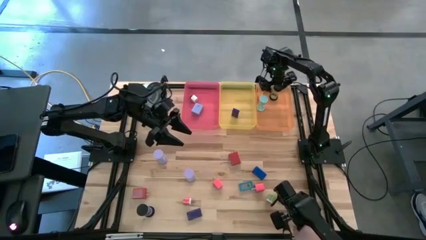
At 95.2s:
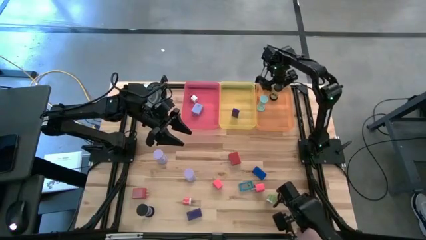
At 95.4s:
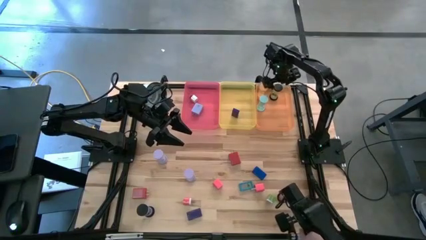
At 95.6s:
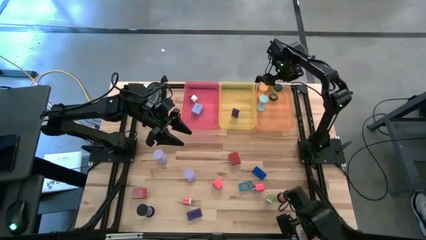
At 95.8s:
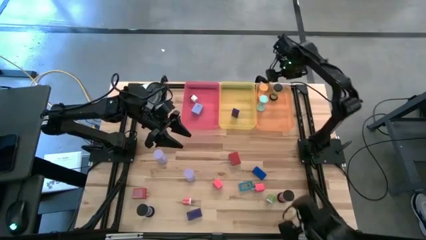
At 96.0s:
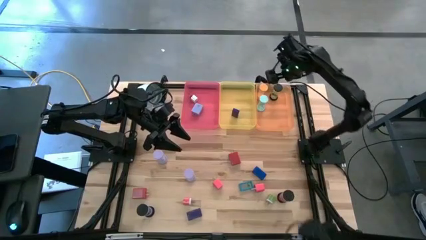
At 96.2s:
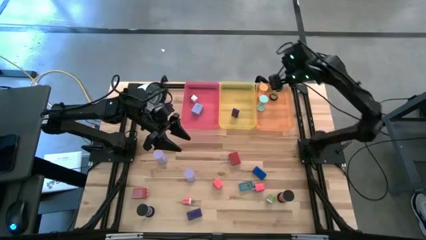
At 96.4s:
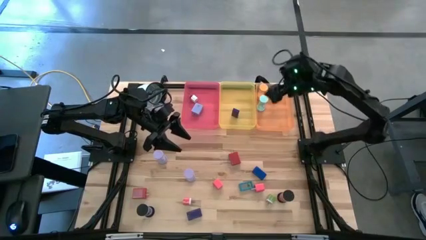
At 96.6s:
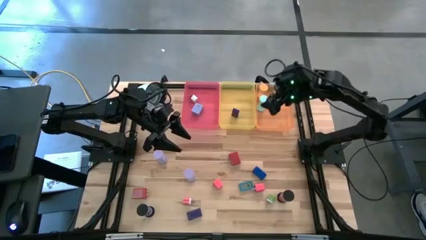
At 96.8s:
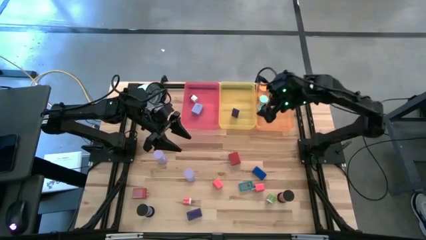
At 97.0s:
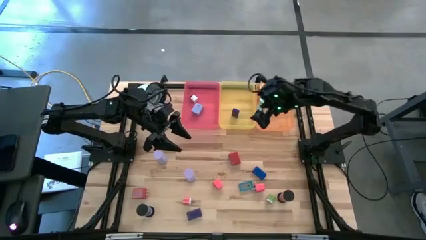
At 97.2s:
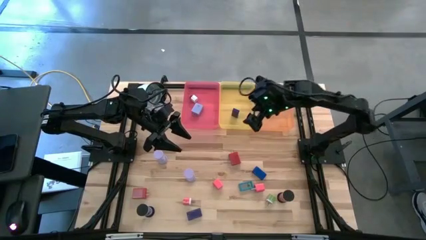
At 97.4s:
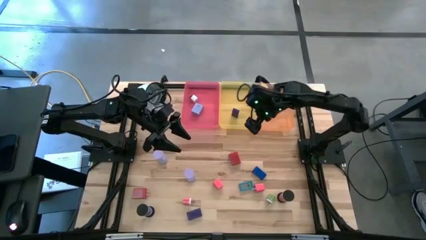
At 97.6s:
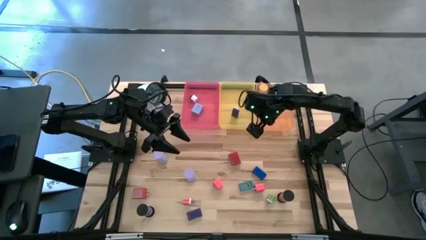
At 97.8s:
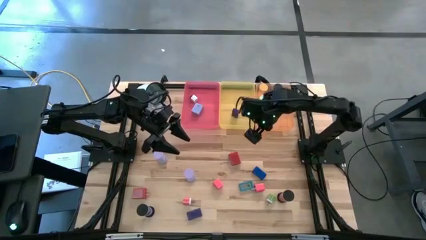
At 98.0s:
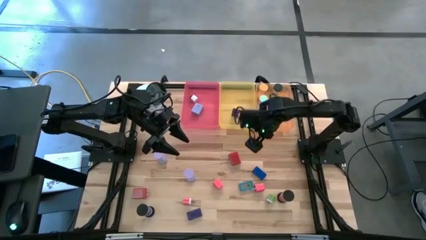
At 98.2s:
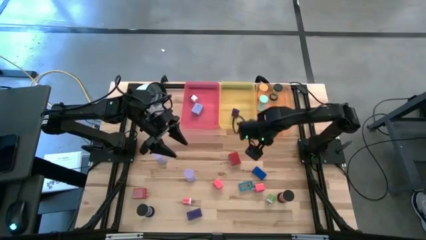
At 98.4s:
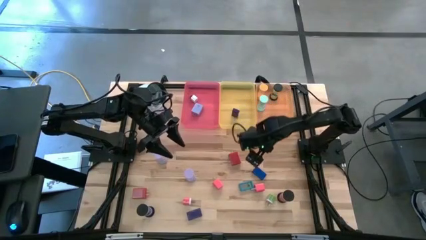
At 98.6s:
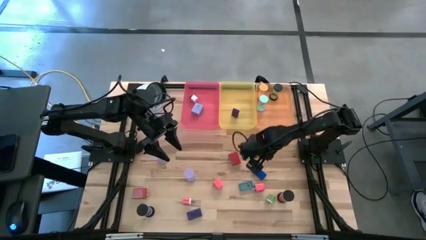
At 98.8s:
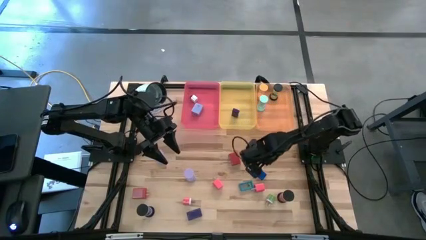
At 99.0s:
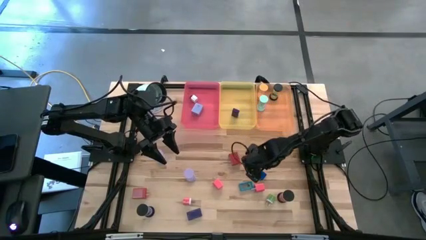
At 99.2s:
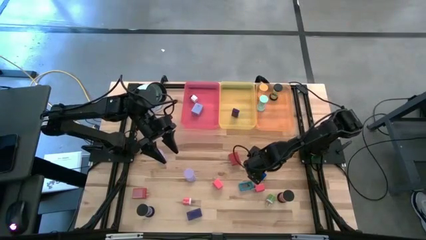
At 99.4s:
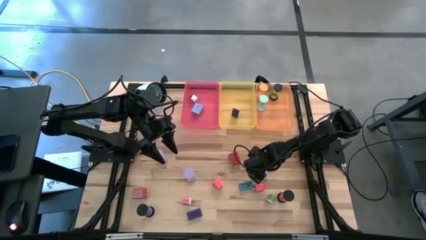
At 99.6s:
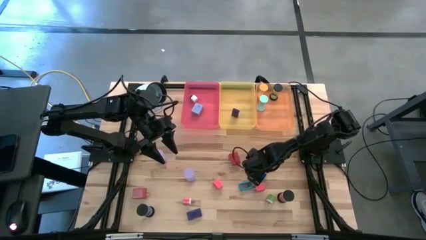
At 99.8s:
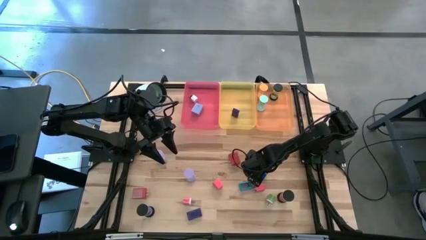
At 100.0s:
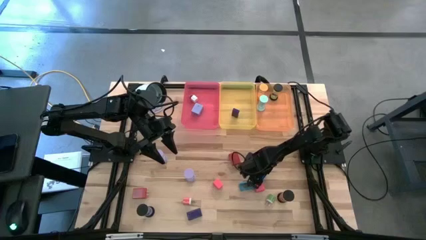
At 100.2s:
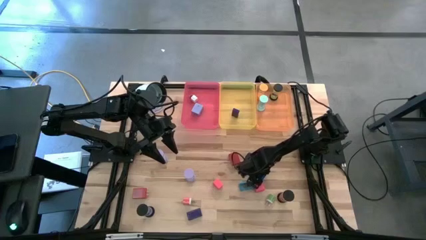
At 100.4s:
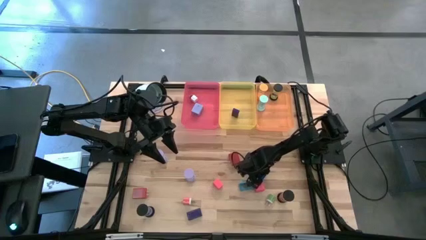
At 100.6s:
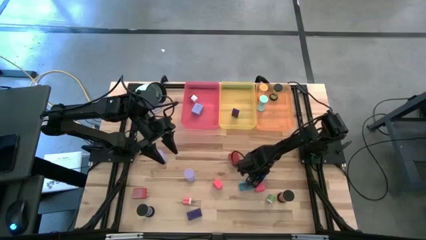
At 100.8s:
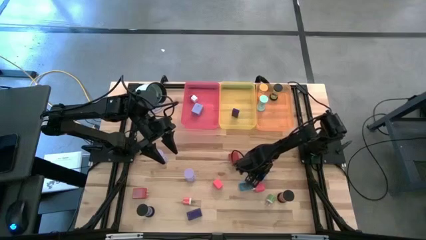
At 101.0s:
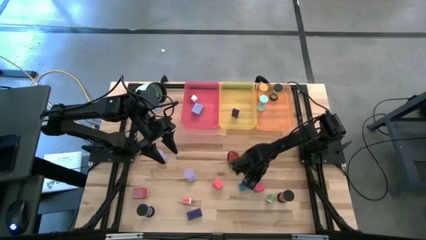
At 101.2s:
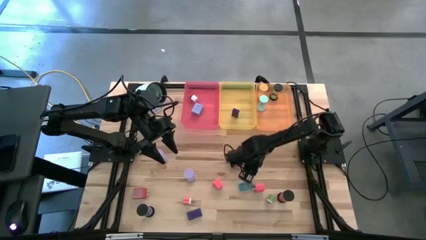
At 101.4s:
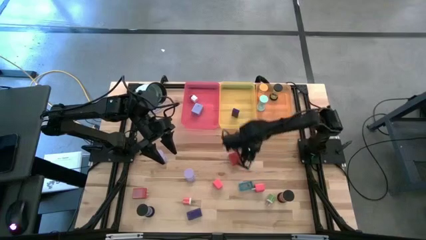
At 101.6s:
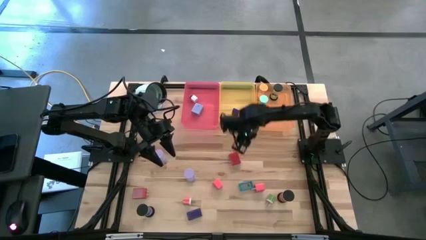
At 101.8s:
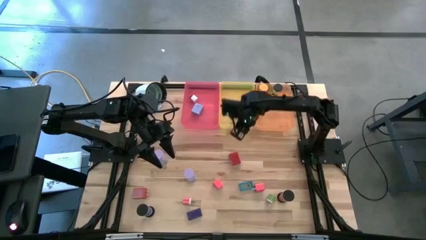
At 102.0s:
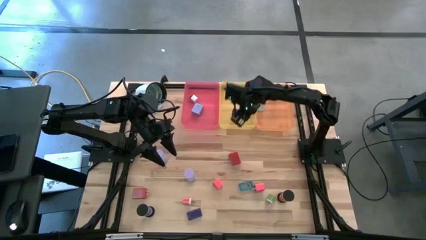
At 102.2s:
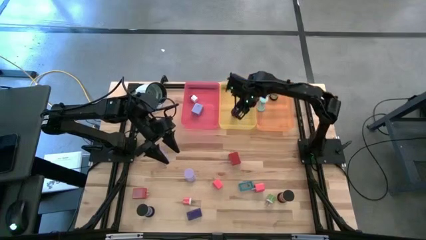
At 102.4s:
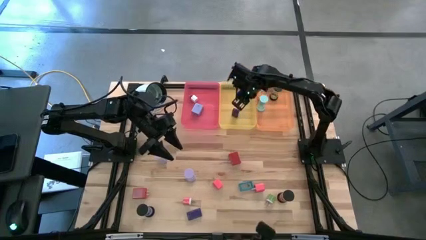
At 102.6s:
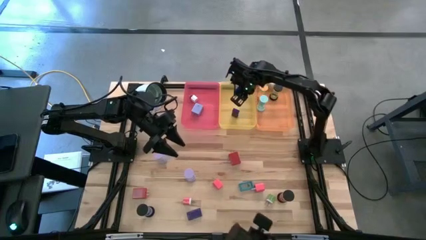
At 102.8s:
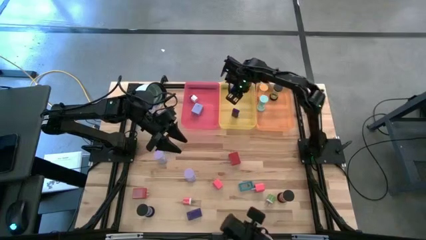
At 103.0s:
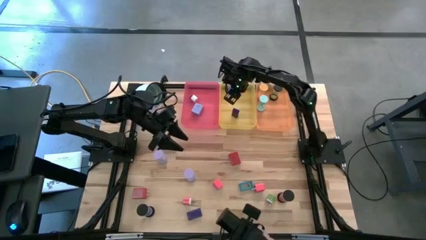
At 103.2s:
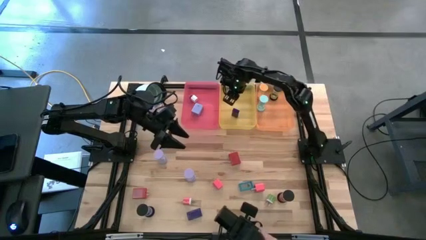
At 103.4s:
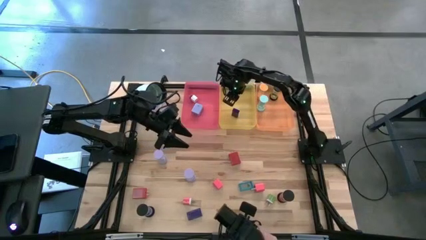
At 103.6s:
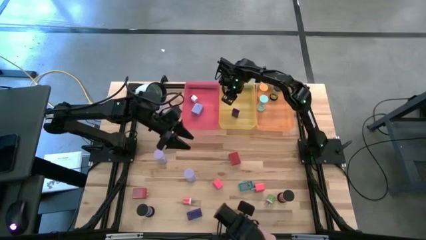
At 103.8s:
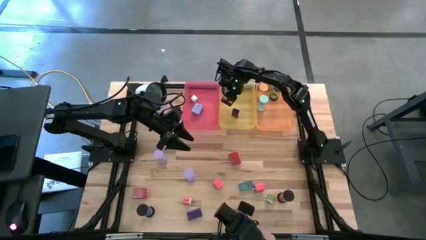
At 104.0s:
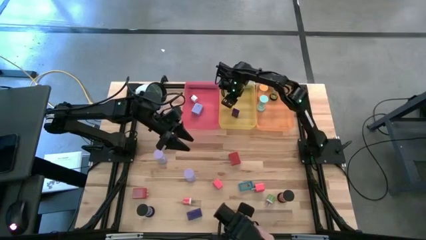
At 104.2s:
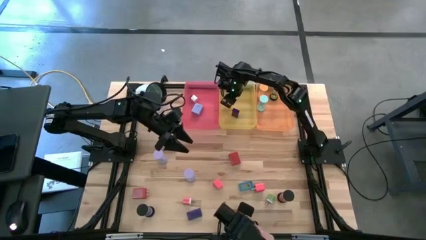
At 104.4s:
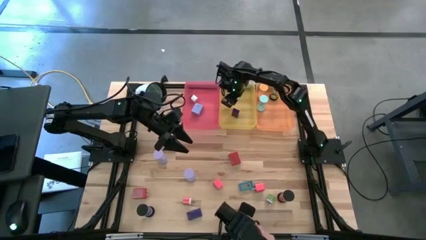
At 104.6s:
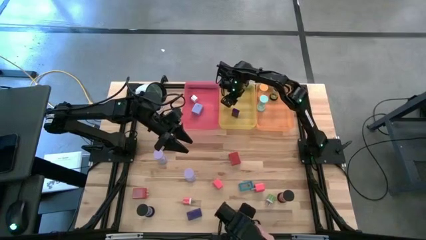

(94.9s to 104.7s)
Task: Pick & Place Office items
Put the blue digital clock into the yellow bin

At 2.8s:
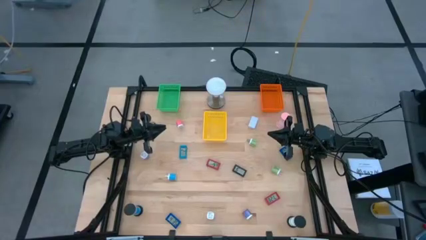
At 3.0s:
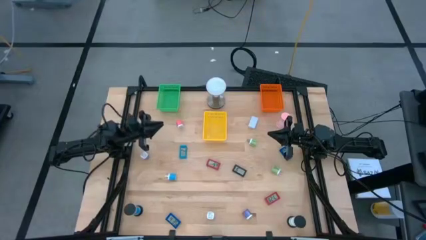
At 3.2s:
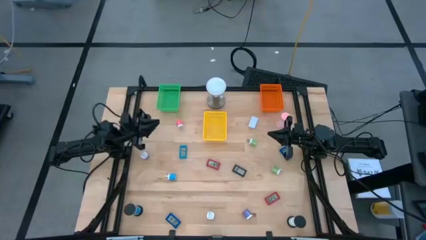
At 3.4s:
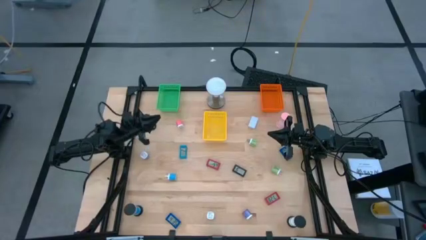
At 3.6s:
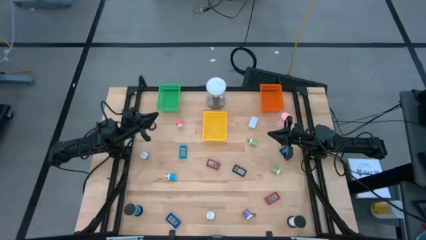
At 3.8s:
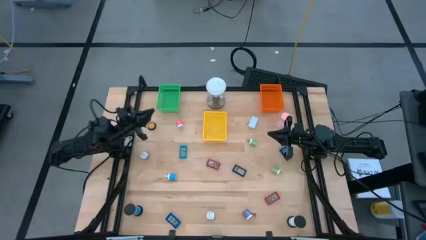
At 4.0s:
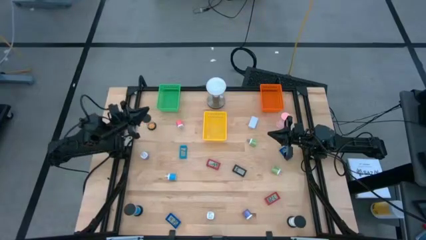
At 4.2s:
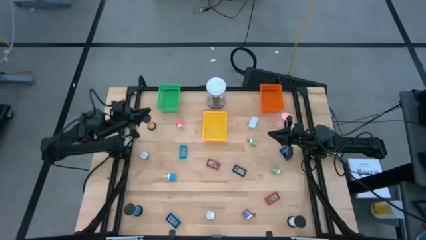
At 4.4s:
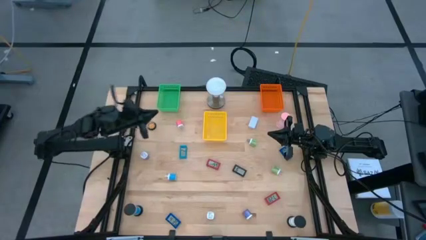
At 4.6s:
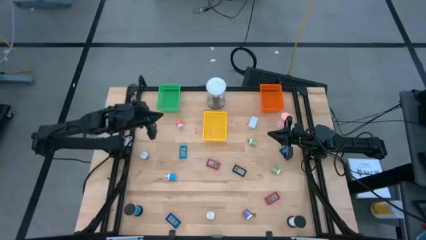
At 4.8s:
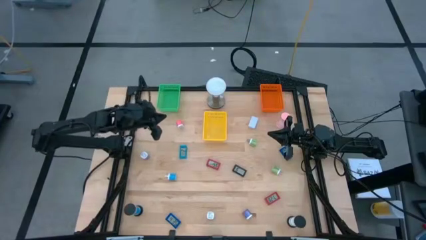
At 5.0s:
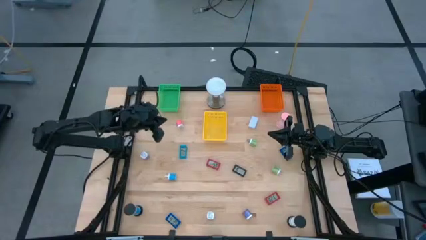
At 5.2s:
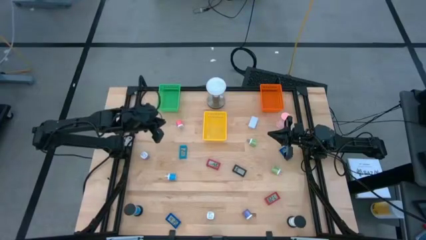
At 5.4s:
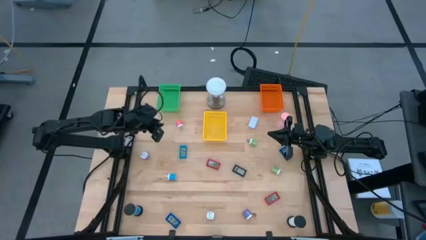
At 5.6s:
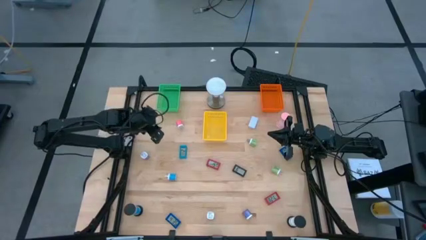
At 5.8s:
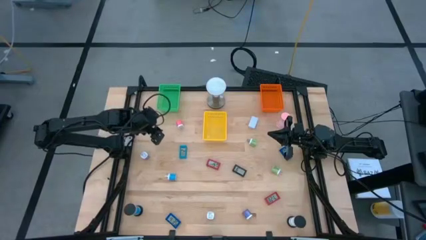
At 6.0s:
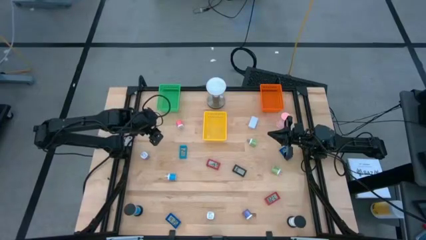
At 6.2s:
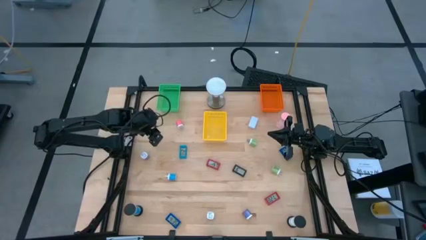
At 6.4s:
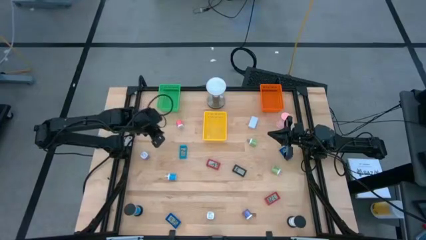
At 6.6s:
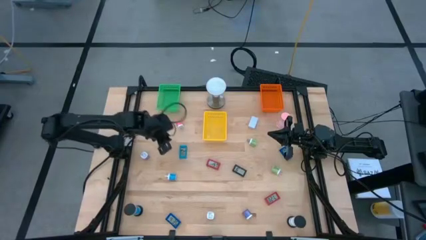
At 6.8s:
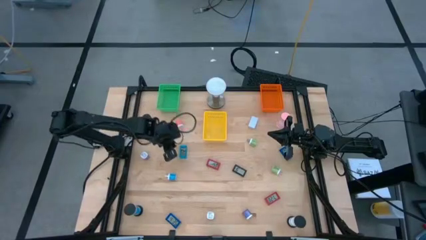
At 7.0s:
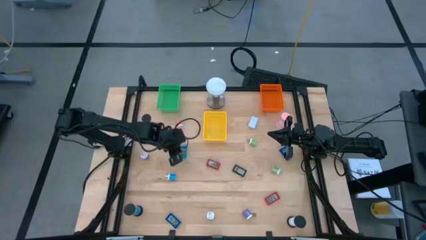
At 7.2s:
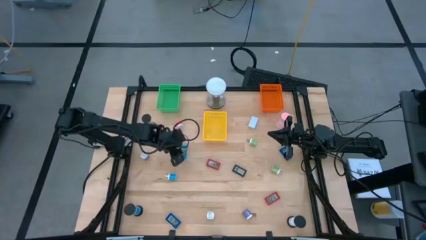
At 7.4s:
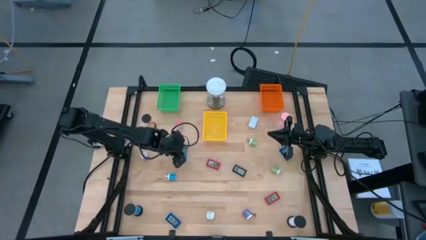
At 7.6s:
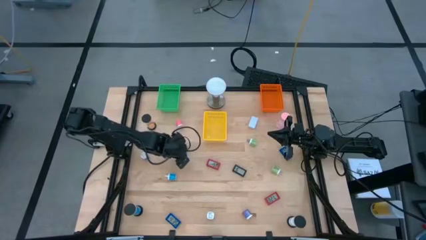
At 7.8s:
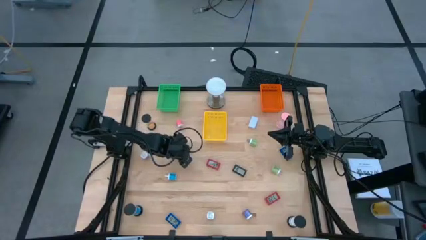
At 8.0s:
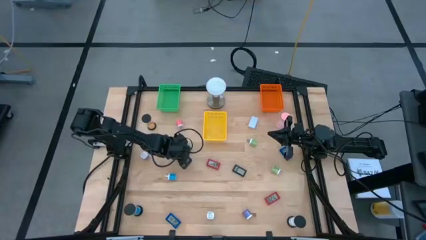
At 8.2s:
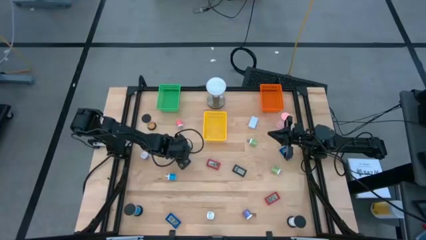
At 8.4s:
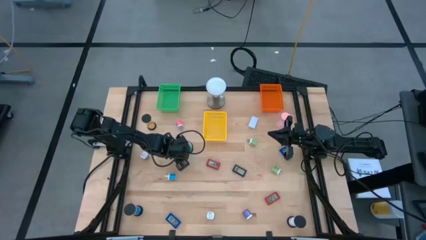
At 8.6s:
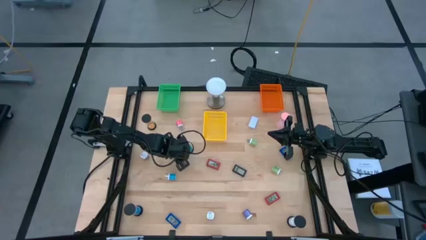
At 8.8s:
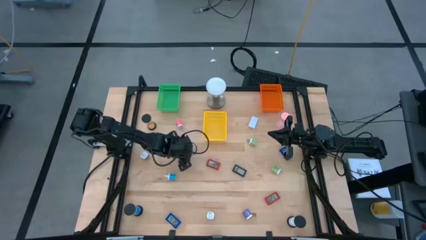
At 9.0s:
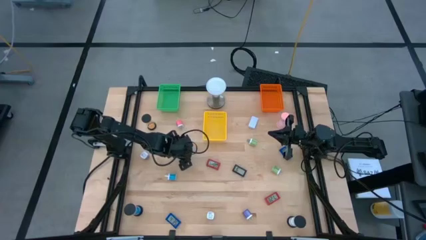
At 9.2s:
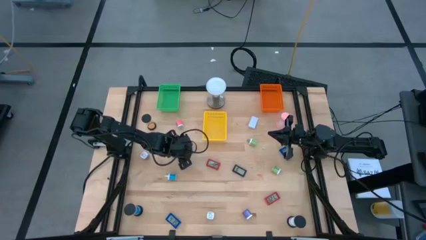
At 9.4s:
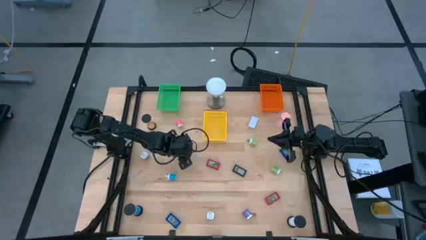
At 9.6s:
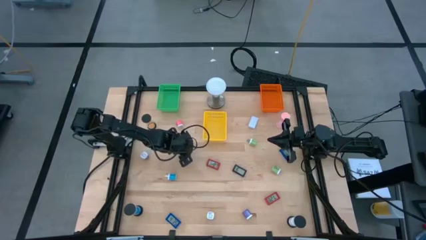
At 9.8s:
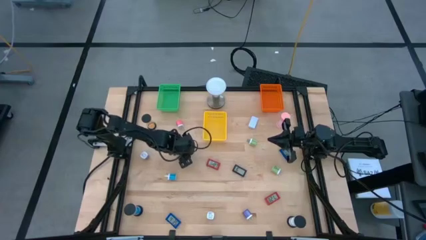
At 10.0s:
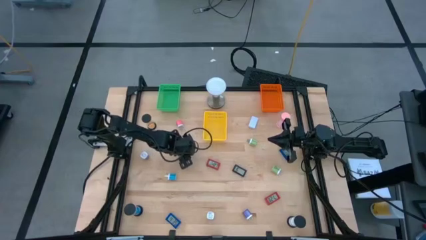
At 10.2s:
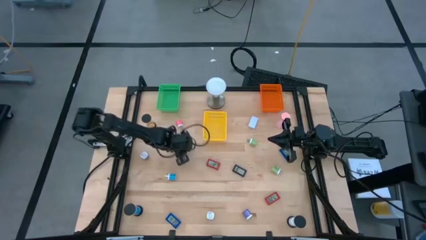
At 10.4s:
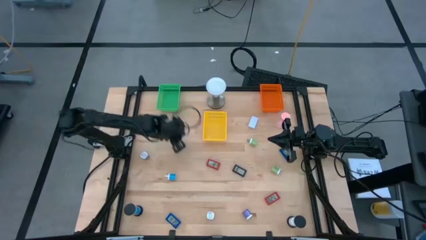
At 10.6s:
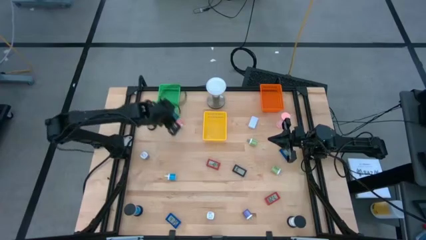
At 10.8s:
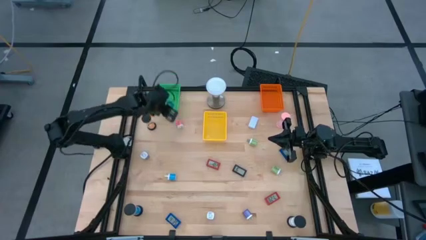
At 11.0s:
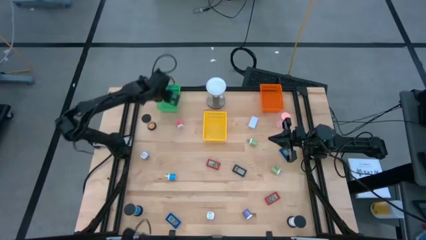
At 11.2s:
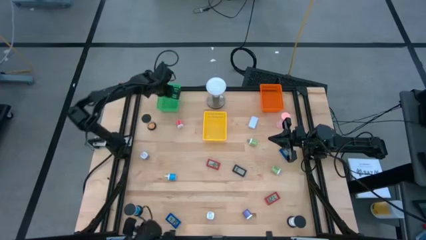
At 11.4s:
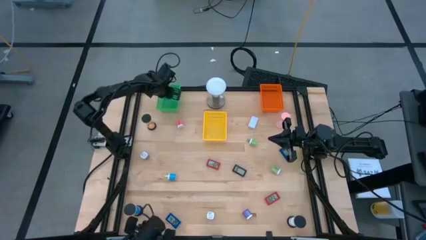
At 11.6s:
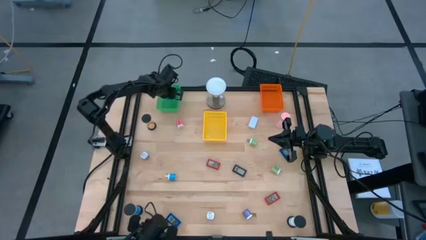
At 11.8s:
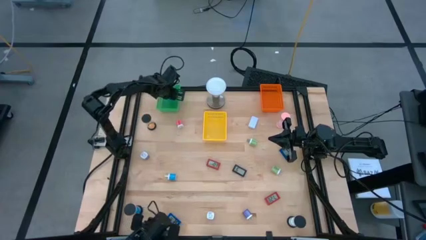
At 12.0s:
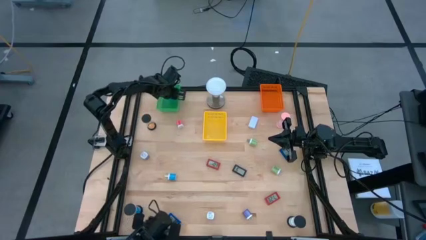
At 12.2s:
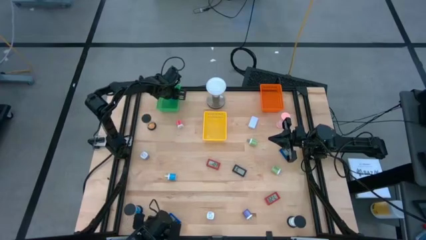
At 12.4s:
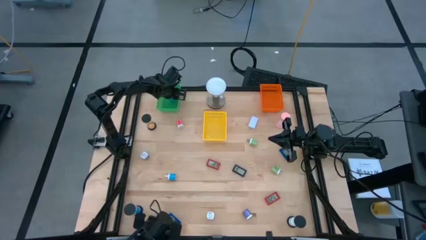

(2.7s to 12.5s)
Task: Pick & Place Office items
Put the light blue digital clock into the green bin
